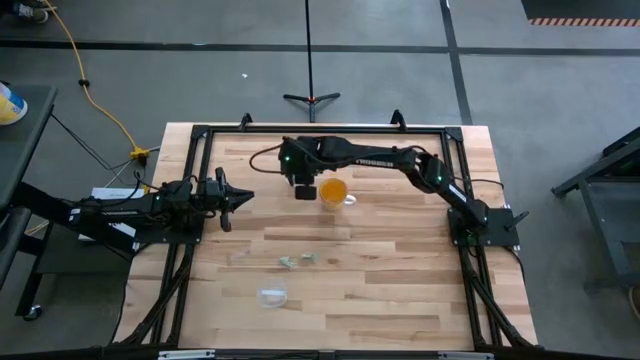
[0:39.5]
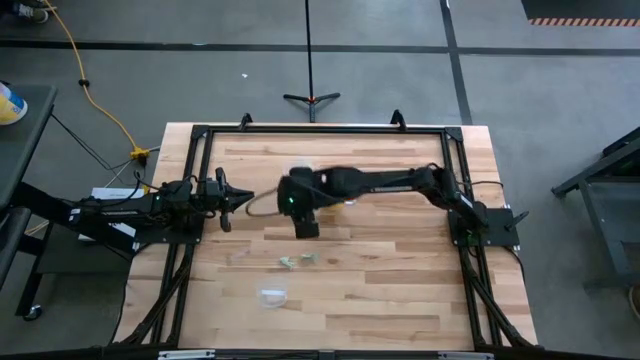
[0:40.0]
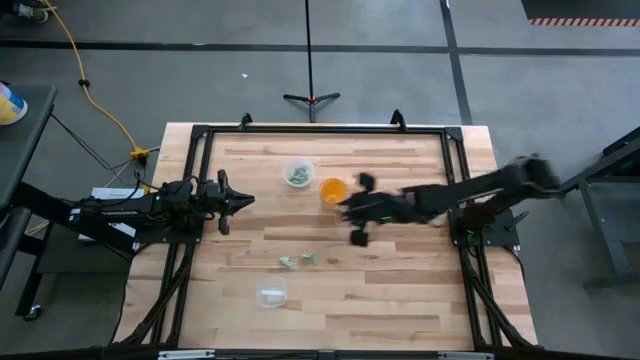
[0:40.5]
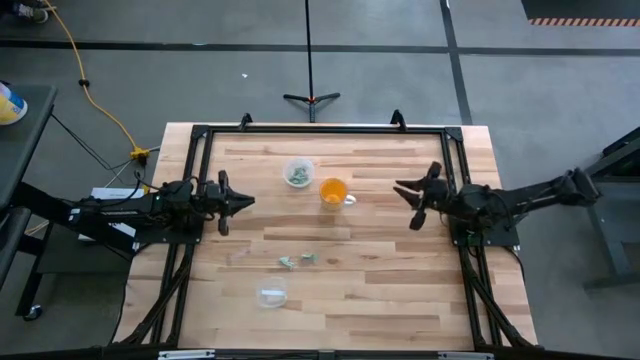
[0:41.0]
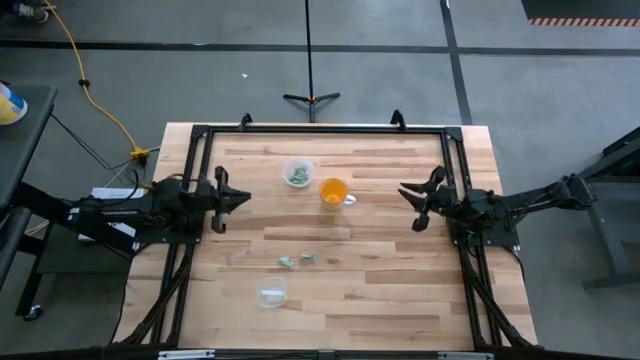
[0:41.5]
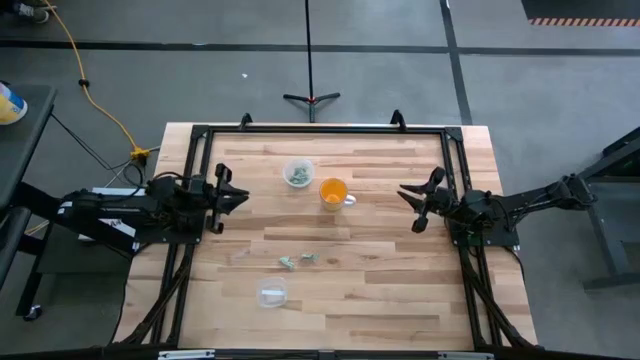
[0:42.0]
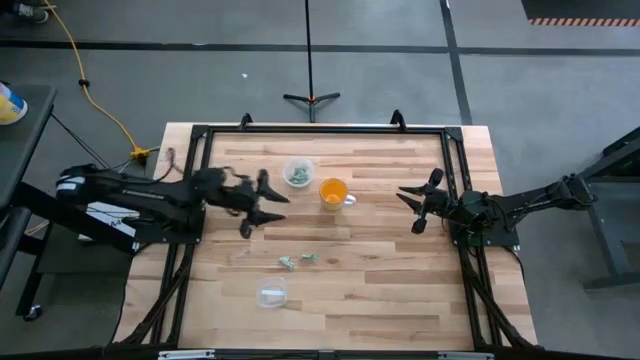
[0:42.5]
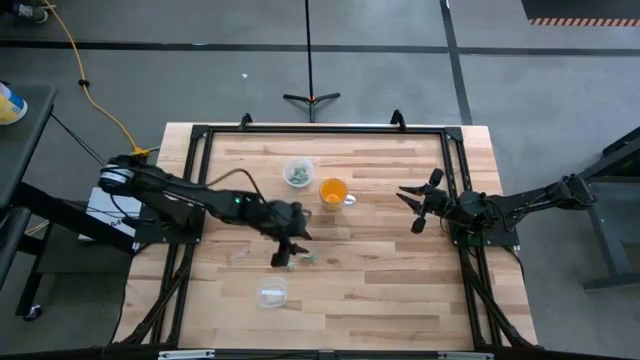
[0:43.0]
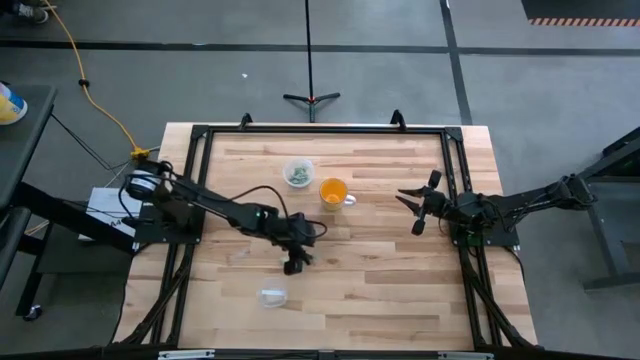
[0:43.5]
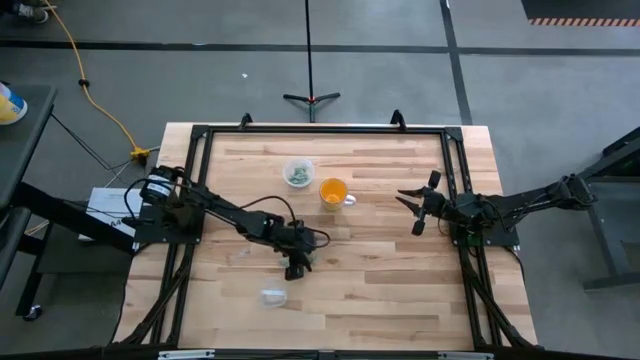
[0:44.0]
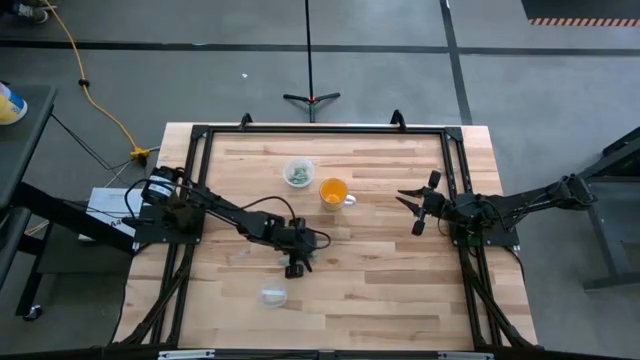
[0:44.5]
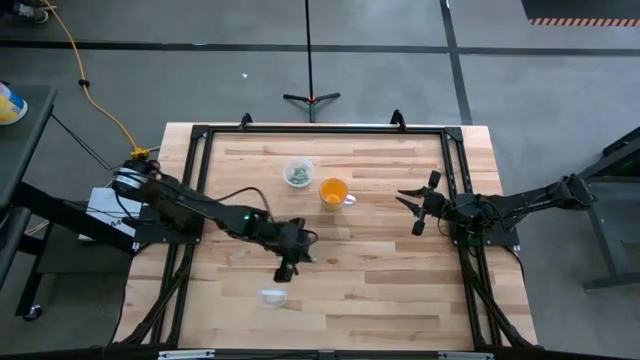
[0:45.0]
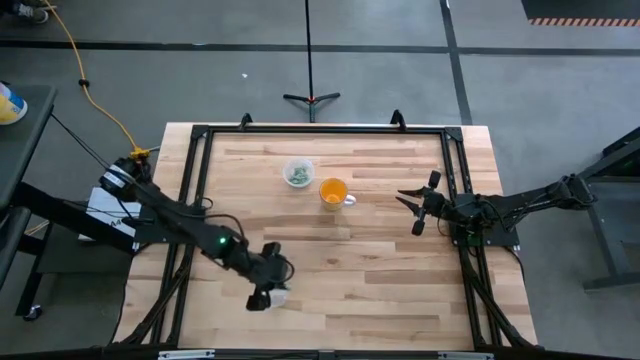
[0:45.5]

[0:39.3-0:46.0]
Task: Pick and place items into bin
Put the light green stevia packet into the bottom transparent bin

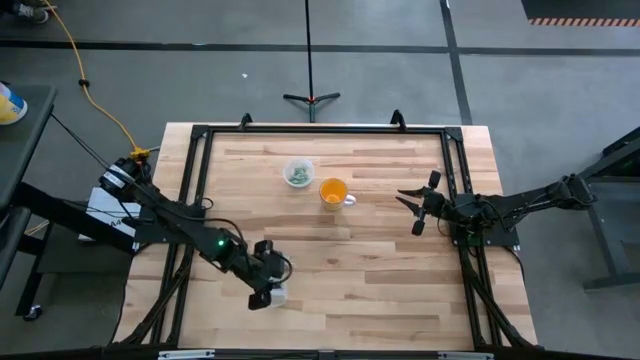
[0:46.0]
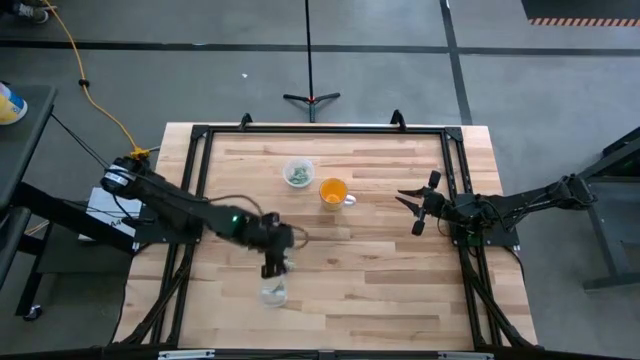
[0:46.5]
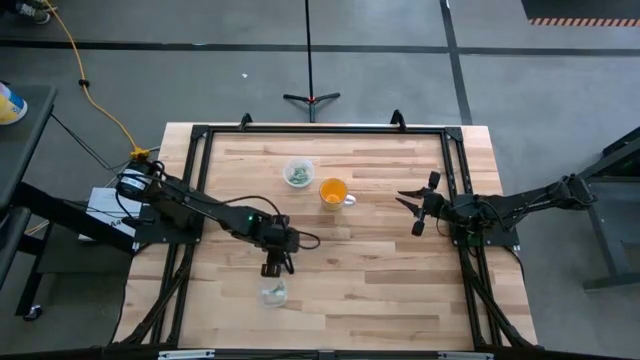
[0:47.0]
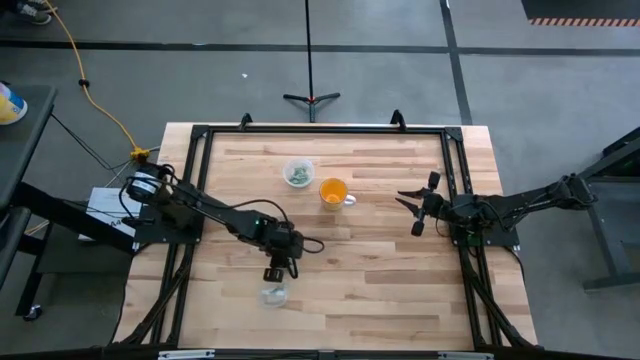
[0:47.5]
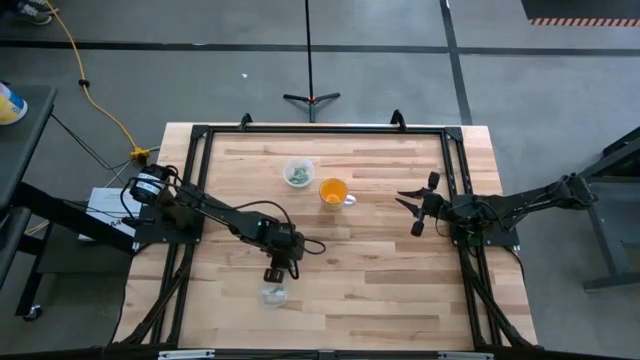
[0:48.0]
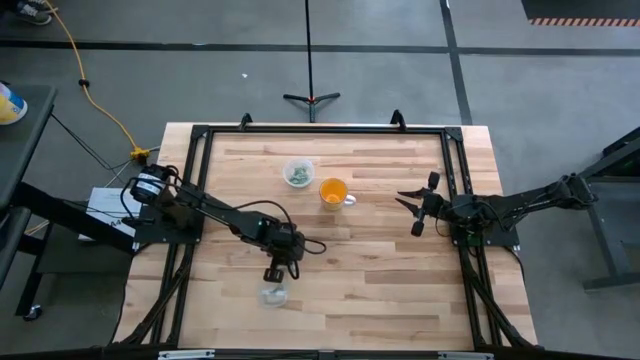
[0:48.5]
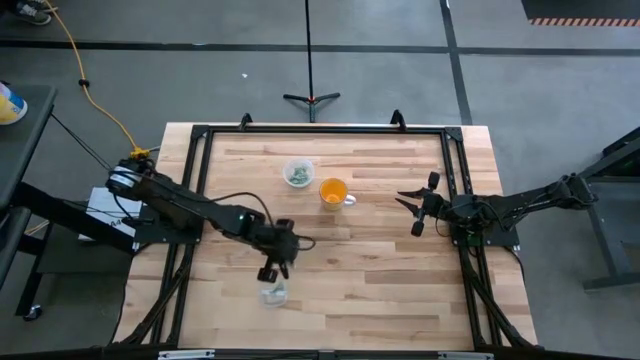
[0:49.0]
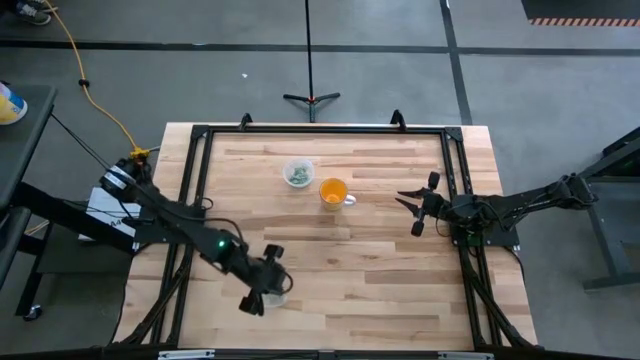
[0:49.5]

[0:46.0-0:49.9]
Put the light green stevia packet into the bottom transparent bin

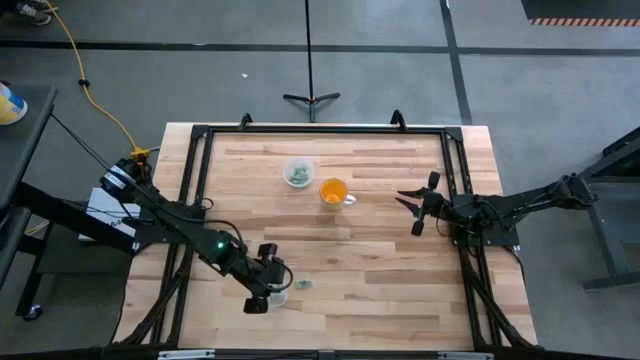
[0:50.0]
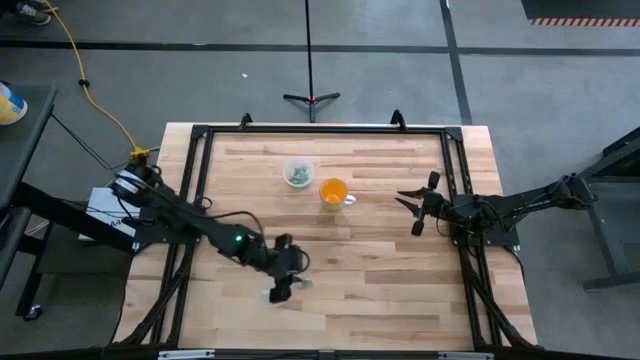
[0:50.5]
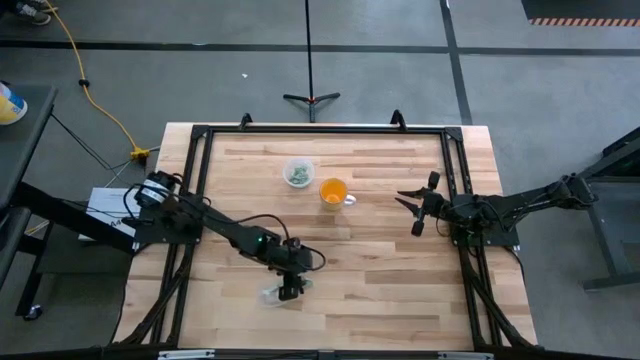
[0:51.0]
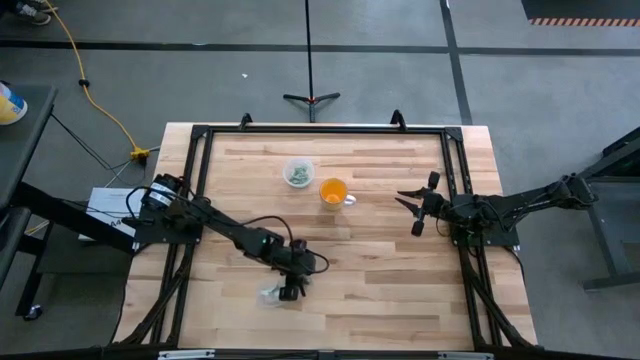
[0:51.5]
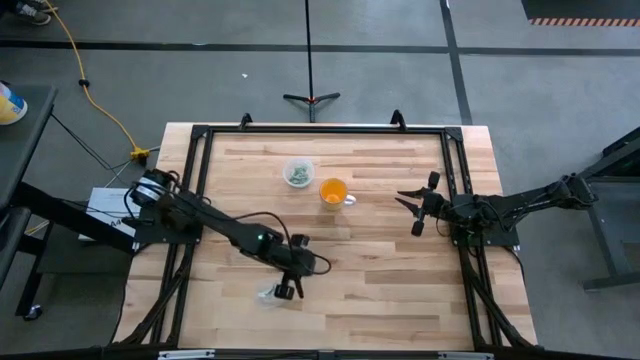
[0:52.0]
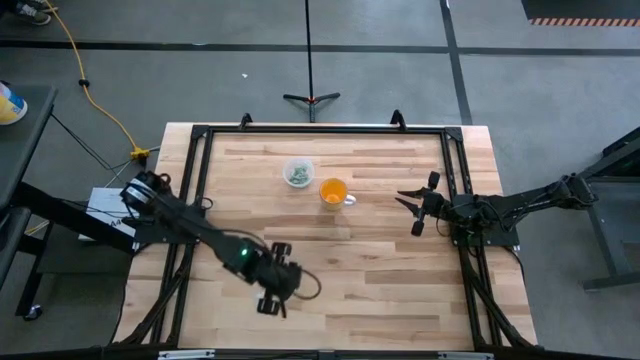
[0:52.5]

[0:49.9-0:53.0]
Put the light green stevia packet into the bottom transparent bin

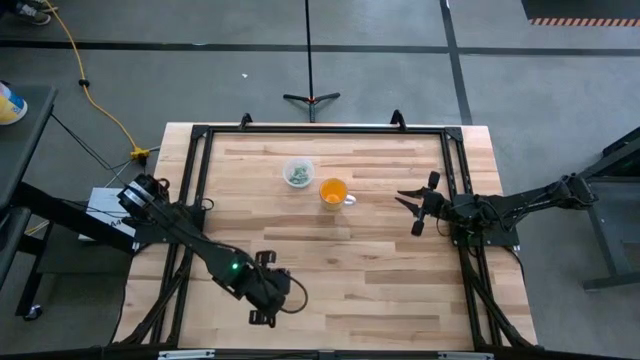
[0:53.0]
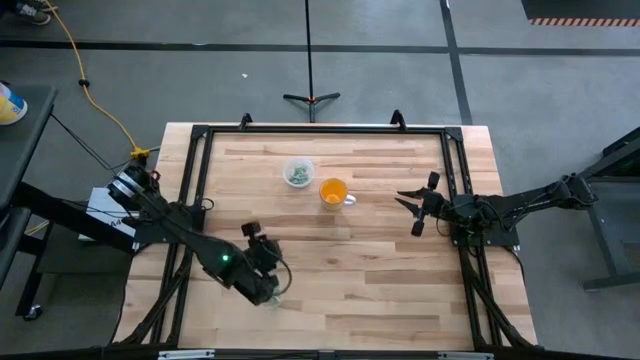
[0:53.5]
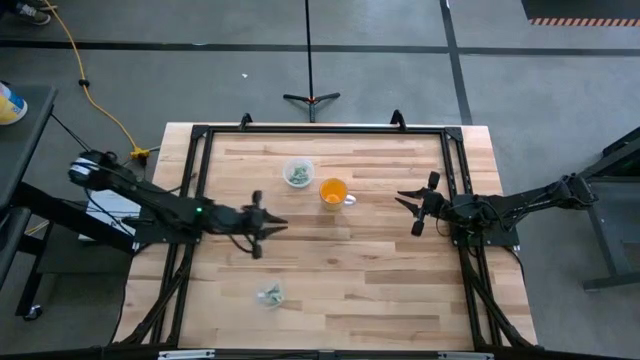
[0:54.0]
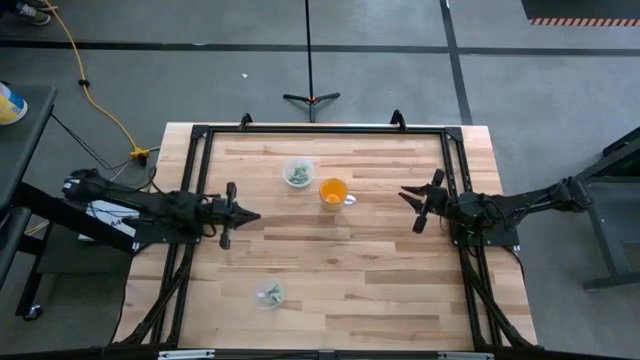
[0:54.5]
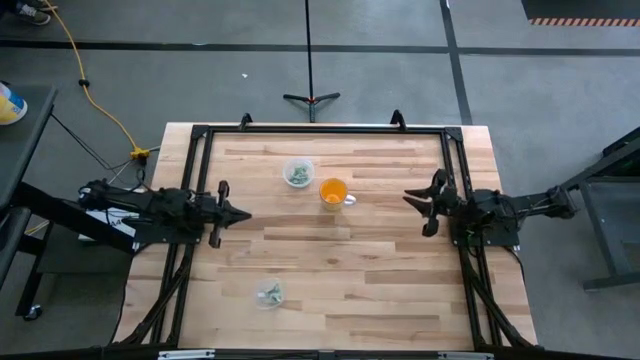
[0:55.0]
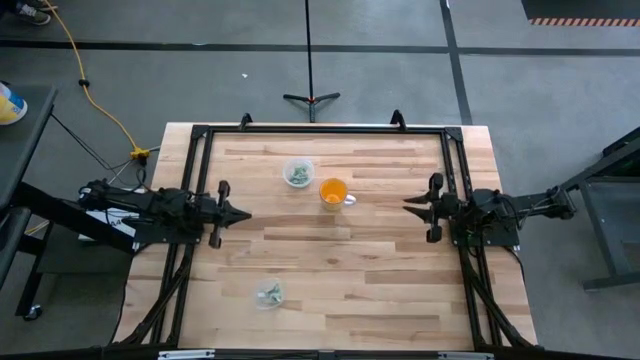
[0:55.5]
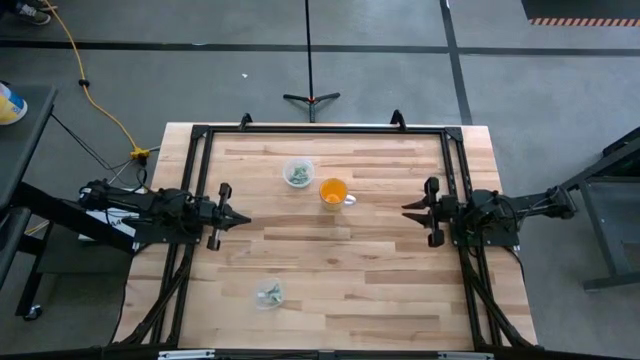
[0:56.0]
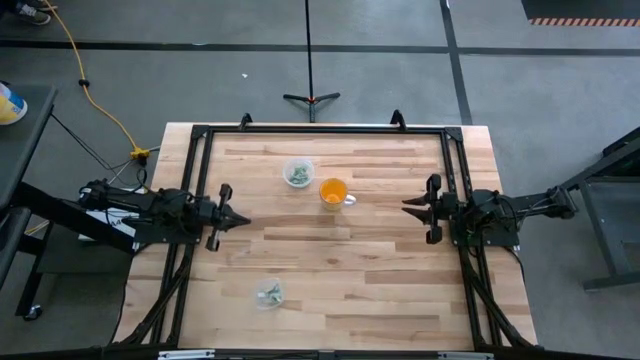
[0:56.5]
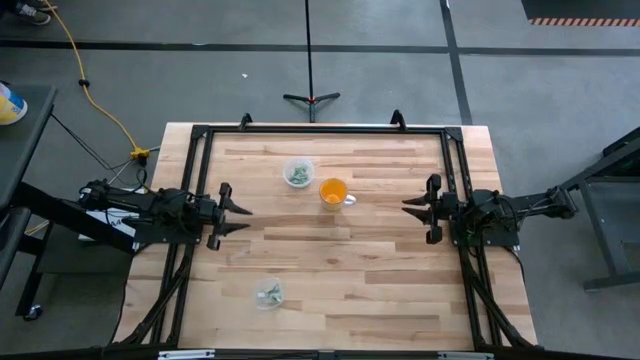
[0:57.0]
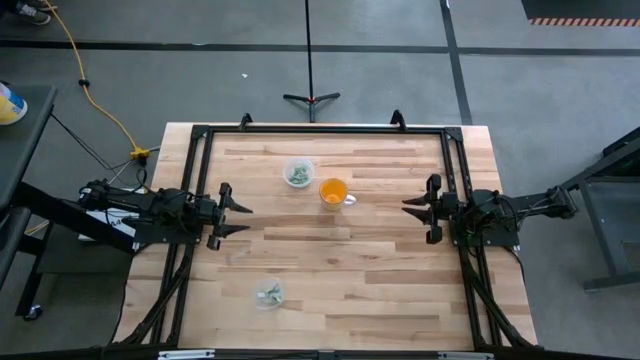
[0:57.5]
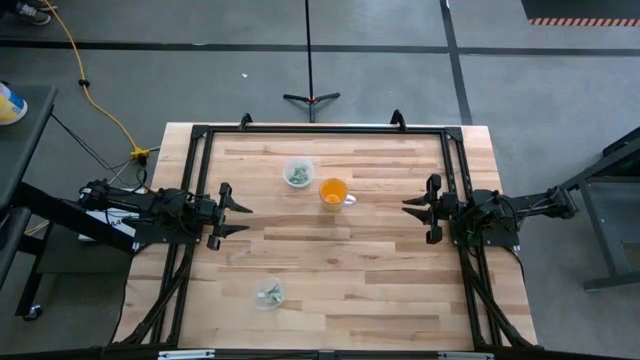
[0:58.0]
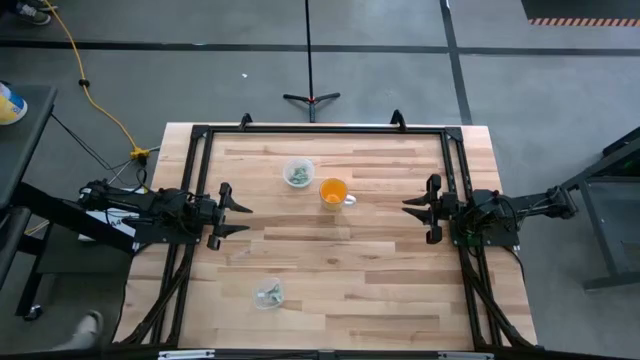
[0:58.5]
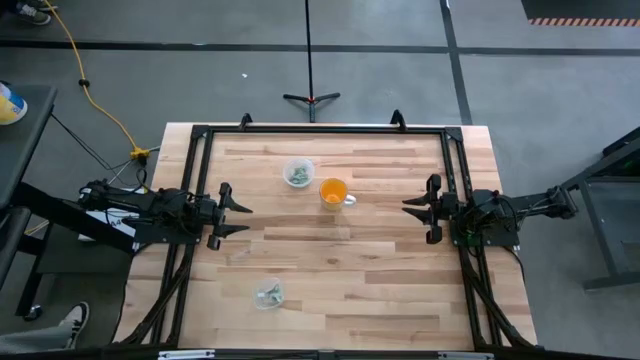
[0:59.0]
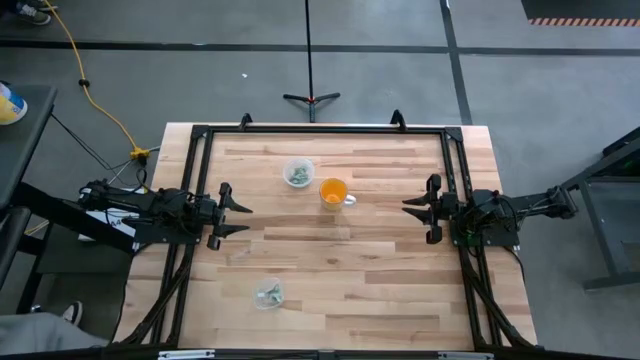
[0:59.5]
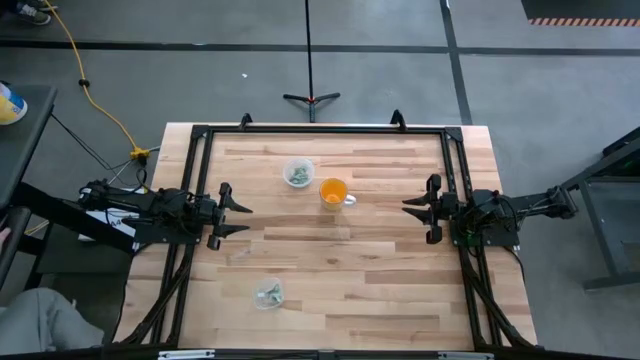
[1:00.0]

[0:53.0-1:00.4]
Return to Home Position
